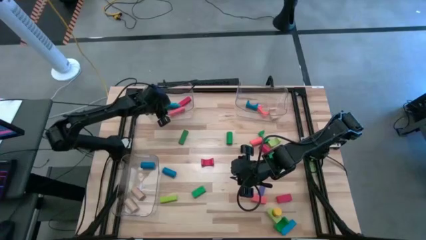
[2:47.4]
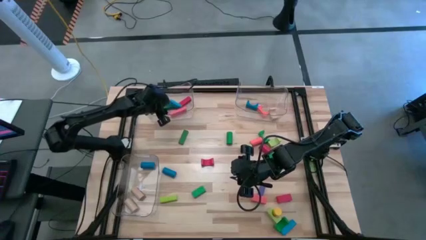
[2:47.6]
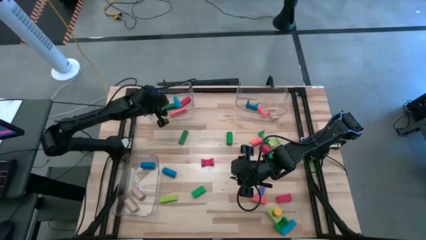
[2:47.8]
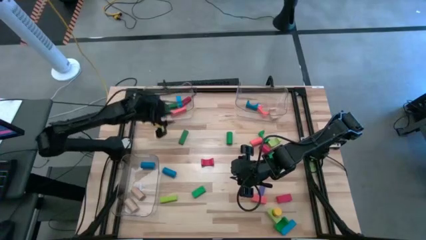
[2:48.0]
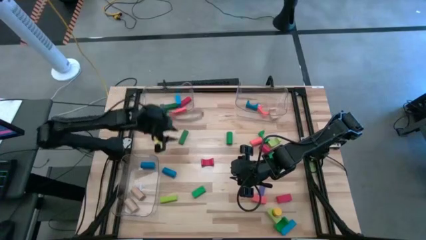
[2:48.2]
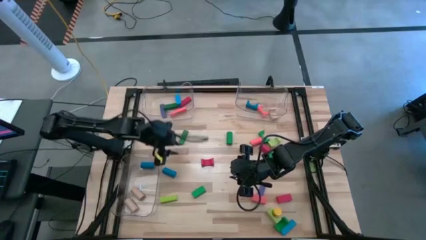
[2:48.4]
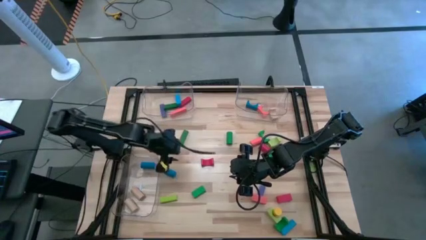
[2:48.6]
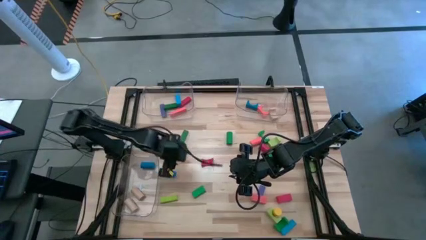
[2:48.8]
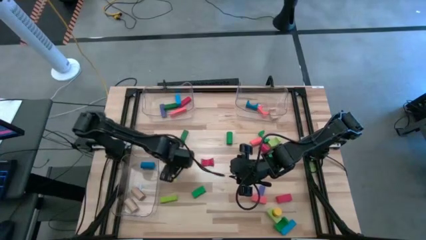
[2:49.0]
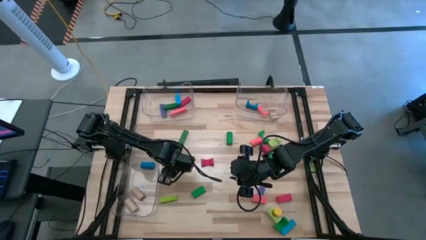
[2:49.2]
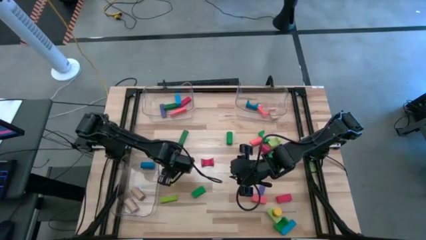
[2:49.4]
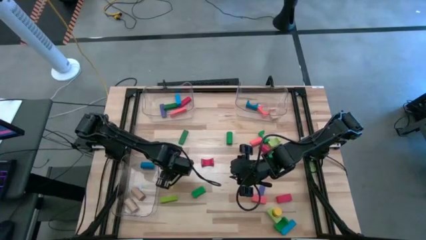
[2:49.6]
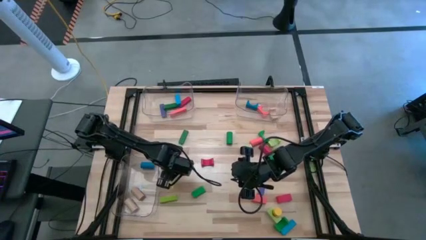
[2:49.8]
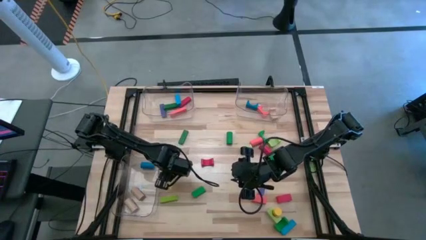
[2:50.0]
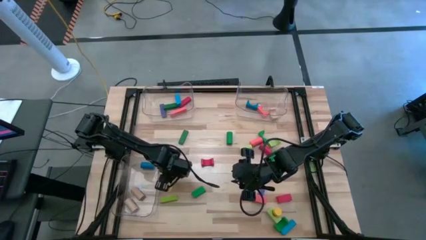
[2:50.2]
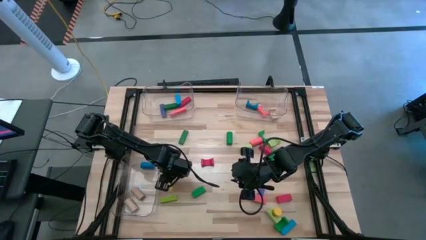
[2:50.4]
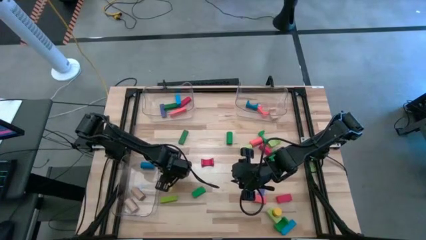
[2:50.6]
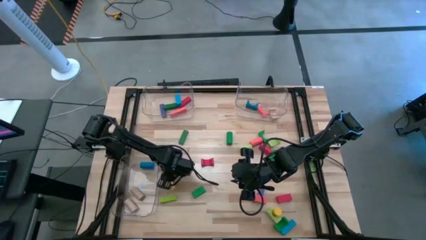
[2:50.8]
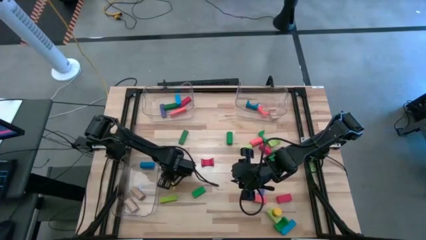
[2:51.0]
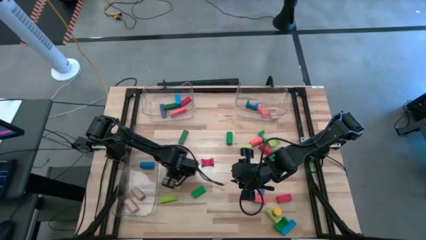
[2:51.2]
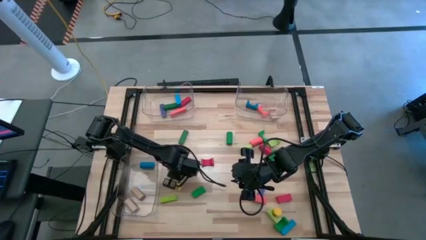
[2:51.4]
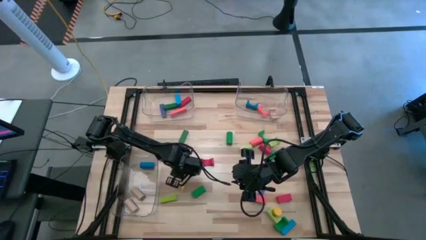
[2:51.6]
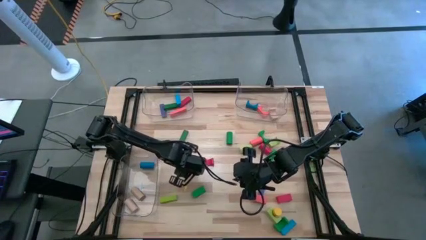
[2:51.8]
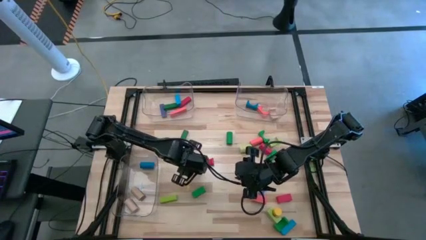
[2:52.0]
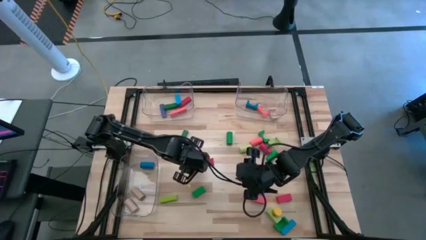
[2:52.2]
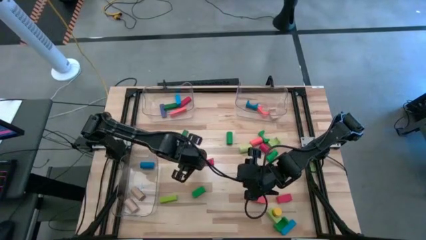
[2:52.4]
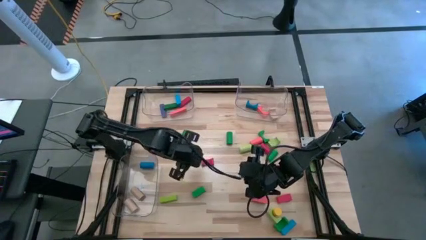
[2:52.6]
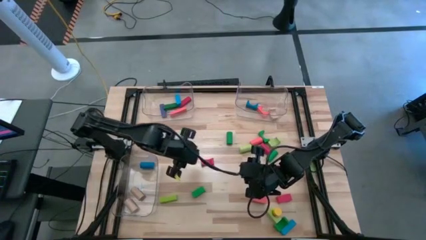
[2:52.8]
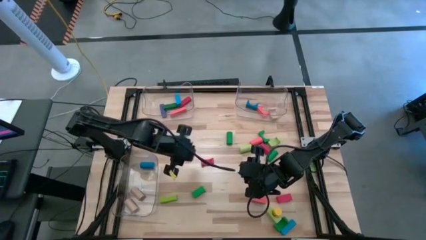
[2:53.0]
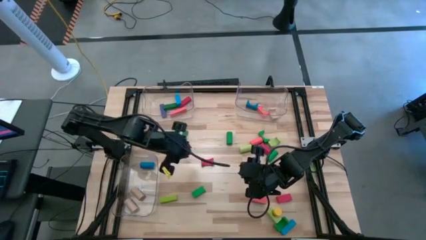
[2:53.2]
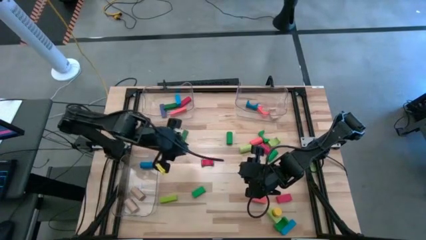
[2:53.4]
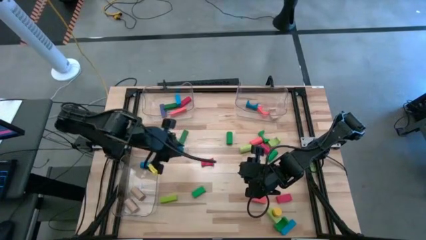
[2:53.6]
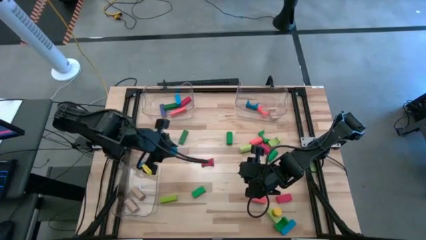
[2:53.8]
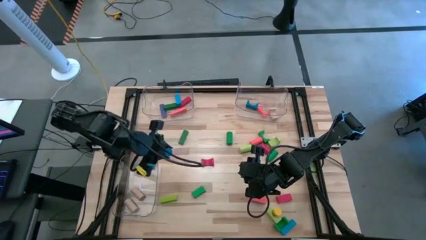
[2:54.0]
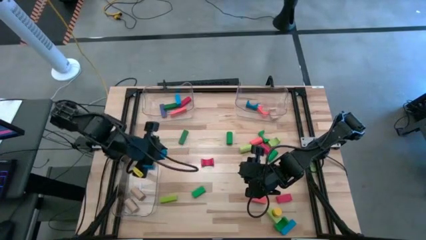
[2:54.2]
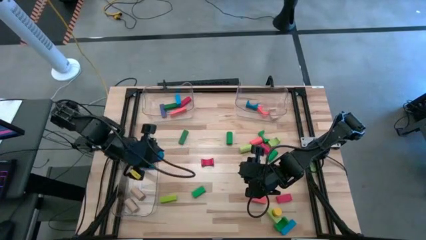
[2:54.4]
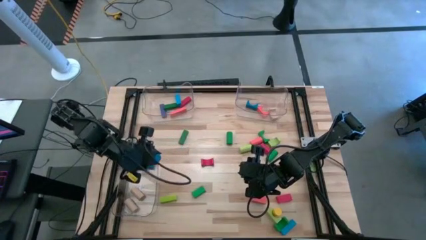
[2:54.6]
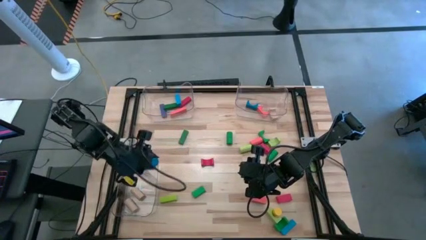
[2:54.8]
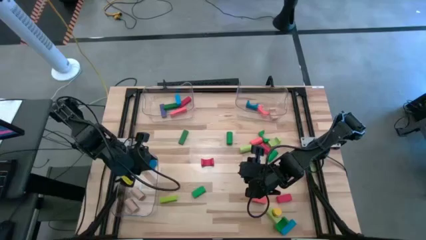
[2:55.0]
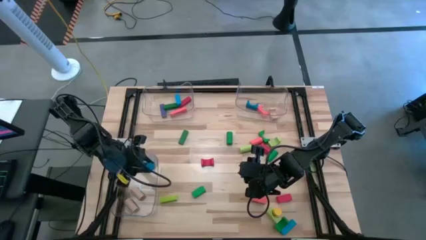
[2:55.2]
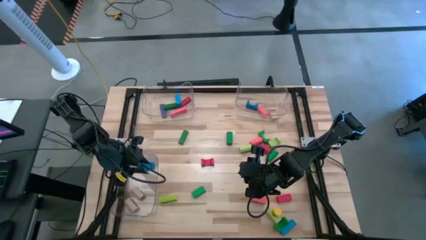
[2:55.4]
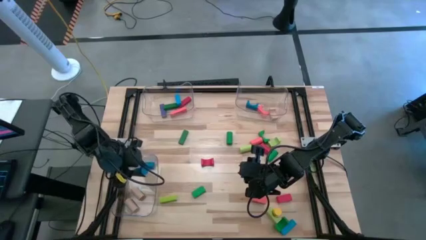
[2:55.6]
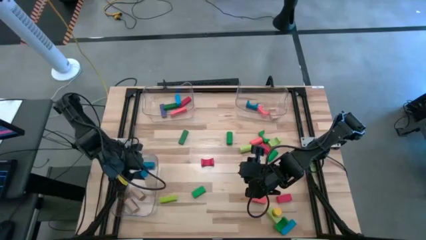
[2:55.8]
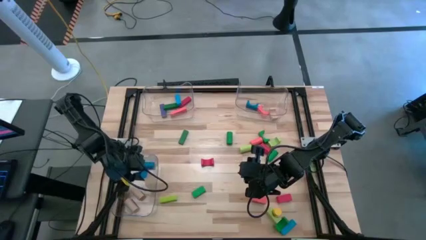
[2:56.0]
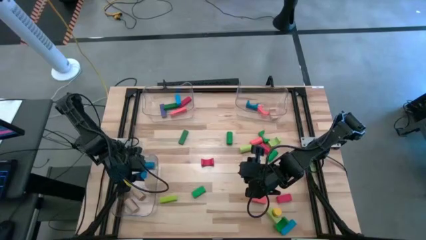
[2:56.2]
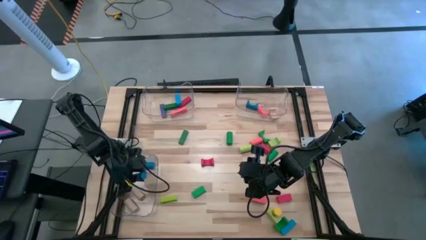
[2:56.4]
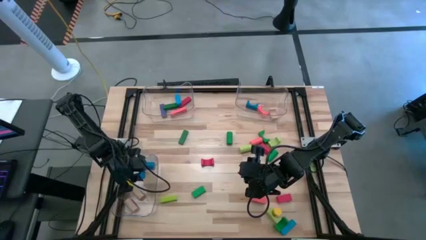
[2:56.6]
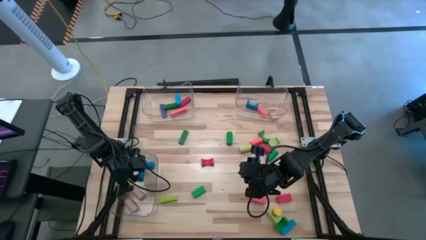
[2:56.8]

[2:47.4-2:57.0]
Task: Sort blocks by size
Put the blue cylindrical block into the bottom left transparent bin

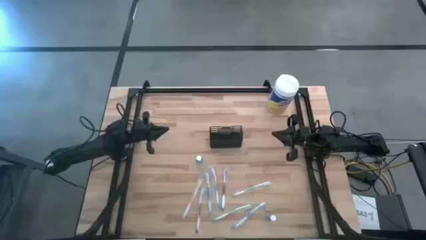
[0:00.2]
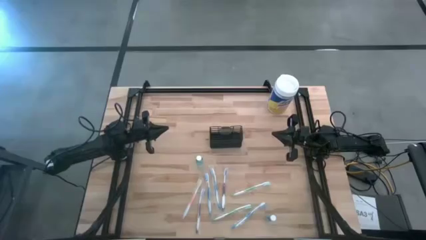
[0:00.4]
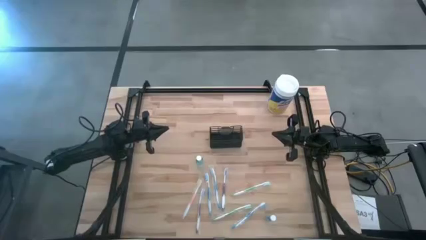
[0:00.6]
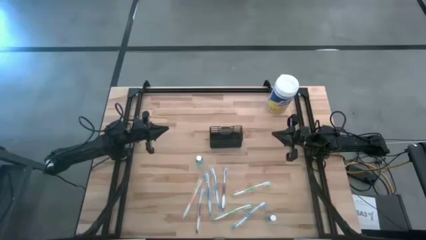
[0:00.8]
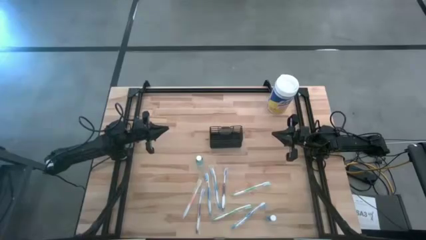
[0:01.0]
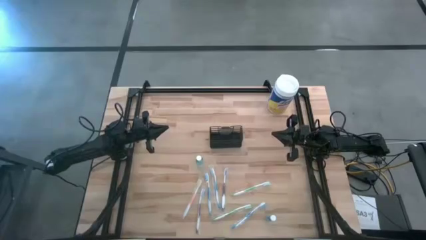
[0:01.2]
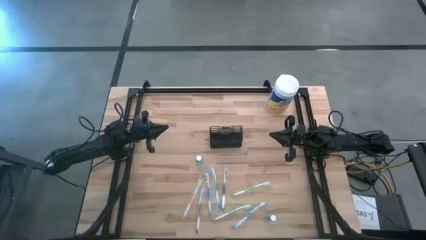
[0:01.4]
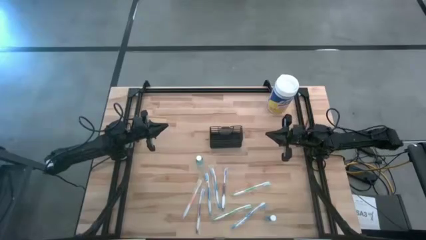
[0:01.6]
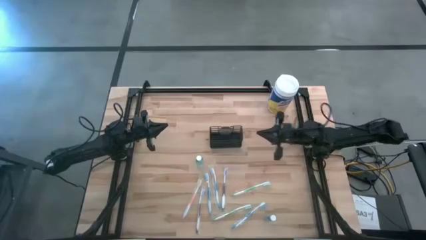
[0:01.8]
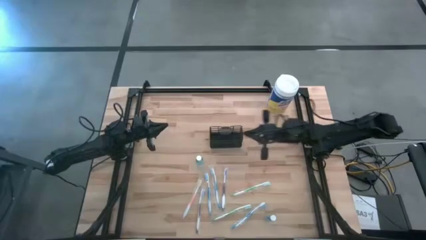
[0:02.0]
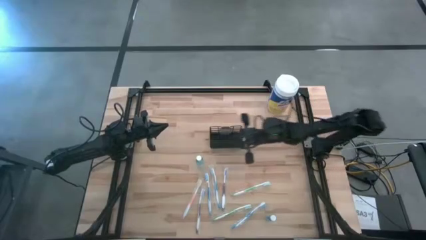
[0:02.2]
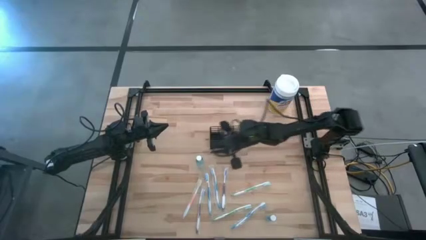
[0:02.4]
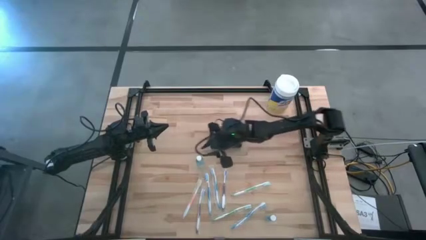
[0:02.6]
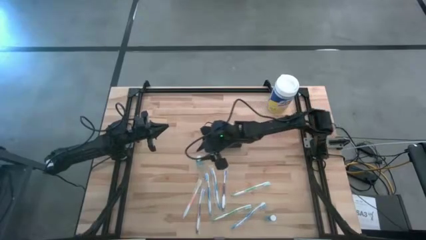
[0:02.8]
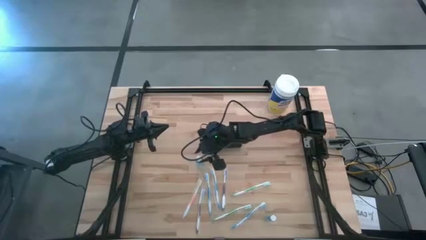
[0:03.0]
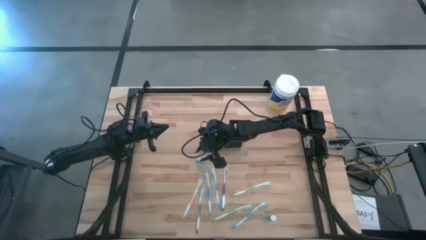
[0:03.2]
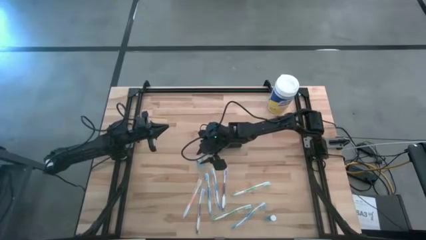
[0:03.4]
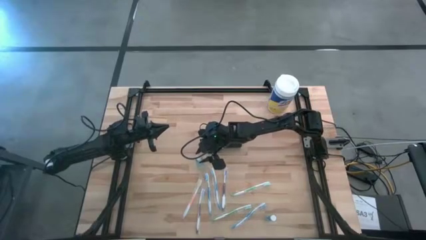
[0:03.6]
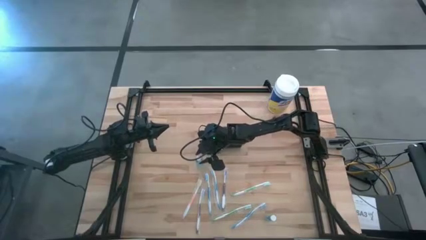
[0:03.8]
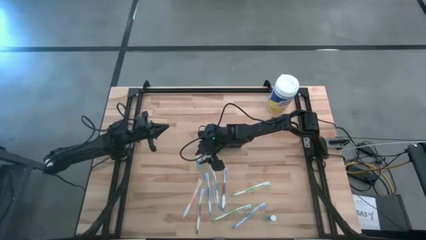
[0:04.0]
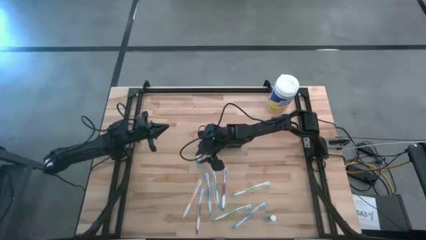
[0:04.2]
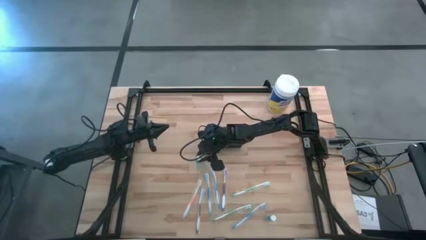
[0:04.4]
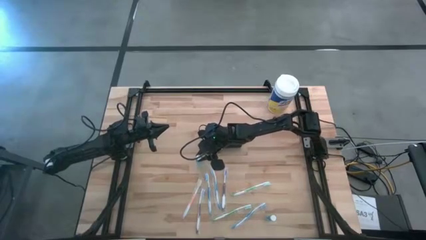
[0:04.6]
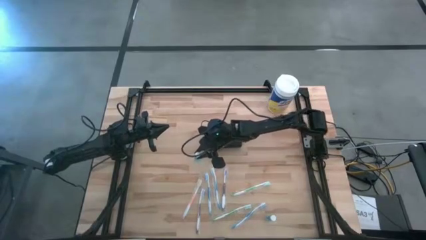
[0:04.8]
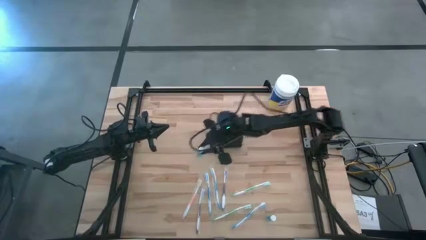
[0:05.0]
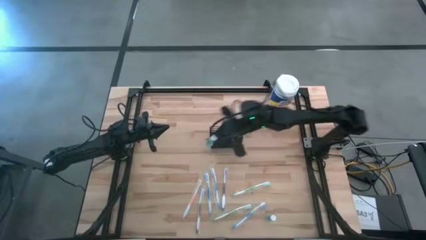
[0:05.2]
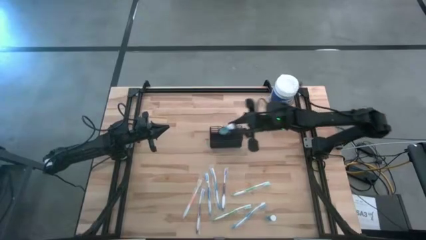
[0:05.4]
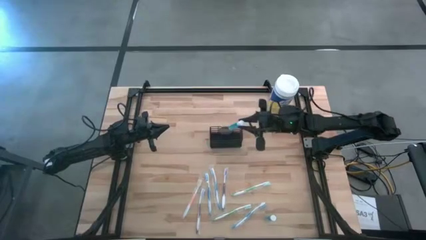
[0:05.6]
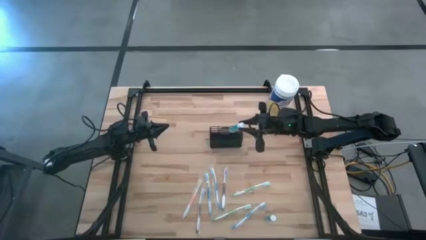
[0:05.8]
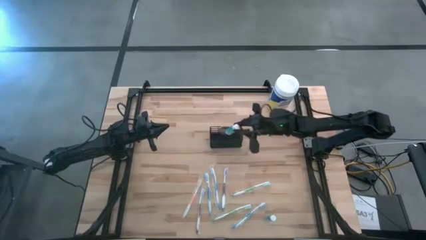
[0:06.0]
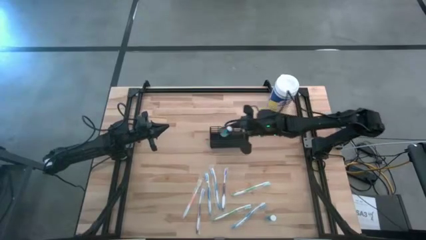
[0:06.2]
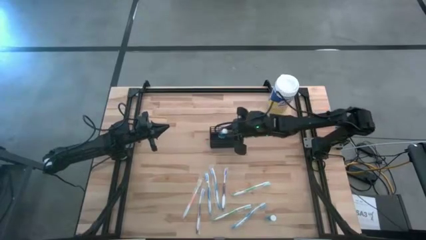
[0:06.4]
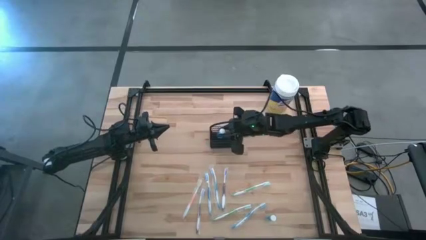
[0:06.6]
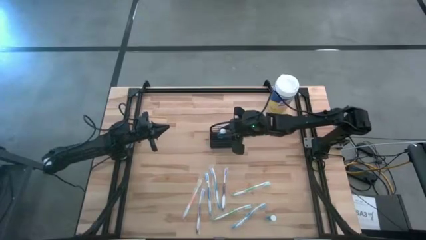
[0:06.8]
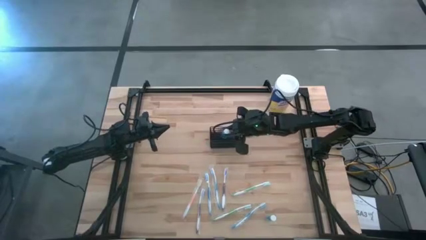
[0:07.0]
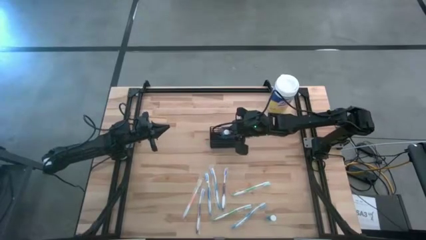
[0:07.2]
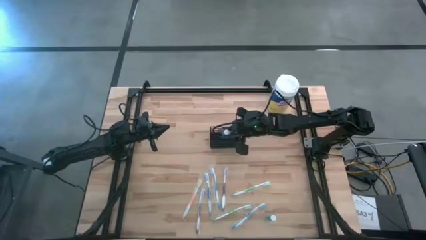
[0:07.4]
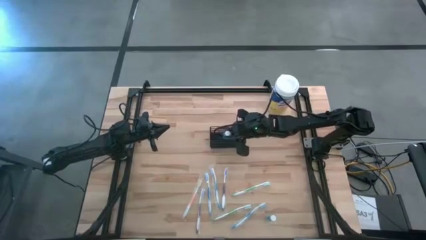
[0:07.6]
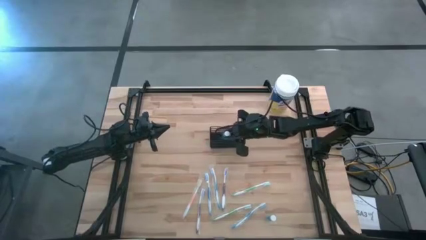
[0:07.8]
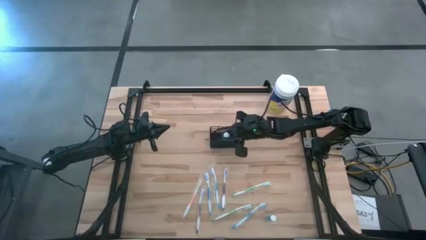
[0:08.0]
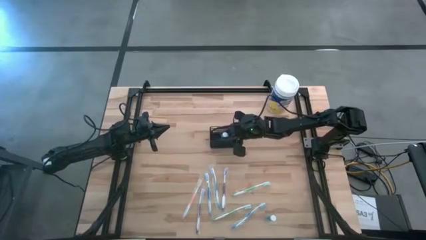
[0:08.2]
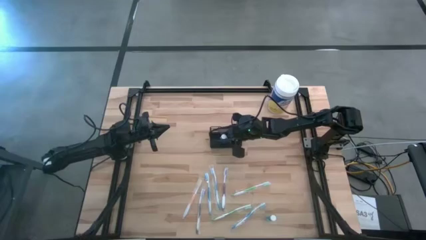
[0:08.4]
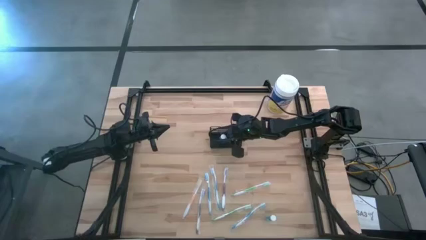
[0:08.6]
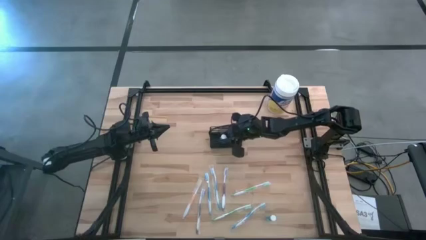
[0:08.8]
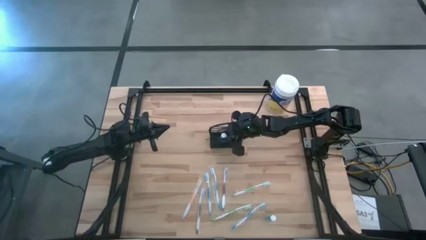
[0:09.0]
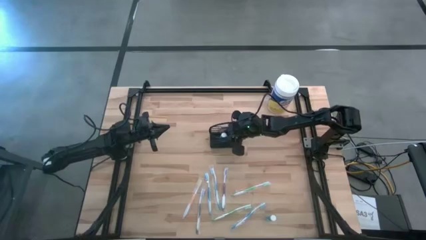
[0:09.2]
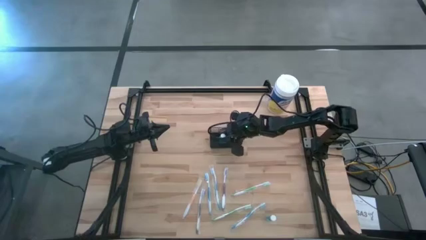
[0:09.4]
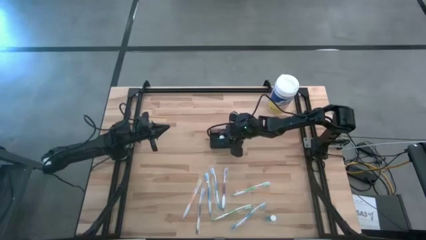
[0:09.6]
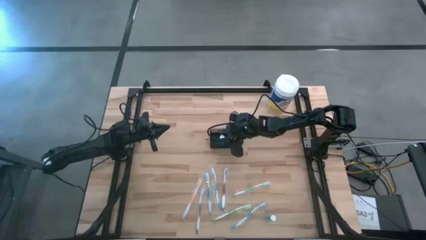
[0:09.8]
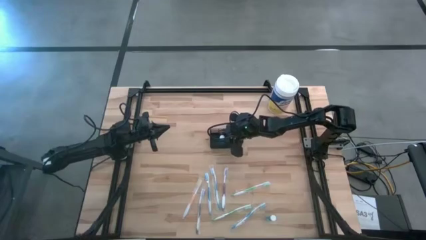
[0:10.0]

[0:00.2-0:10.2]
Task: Pick & Place toothbrushing station
Put the top blue mouthwash into the black wire organizer
